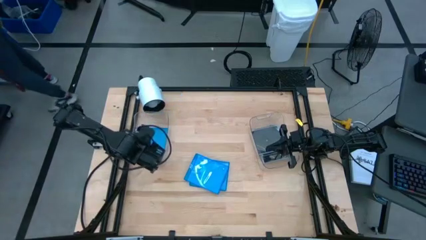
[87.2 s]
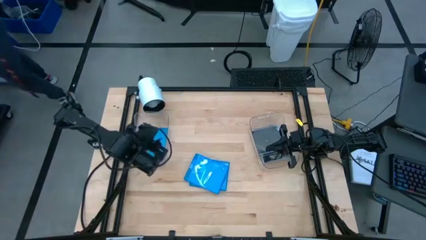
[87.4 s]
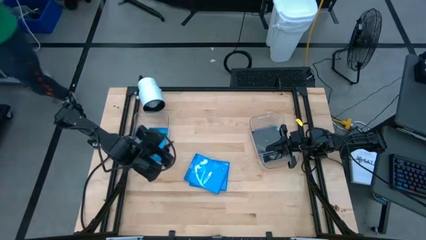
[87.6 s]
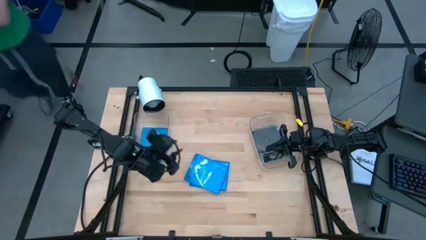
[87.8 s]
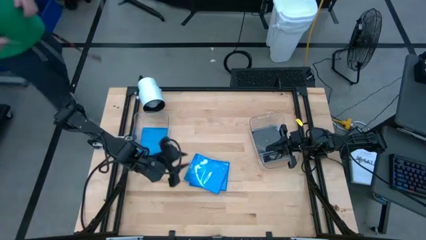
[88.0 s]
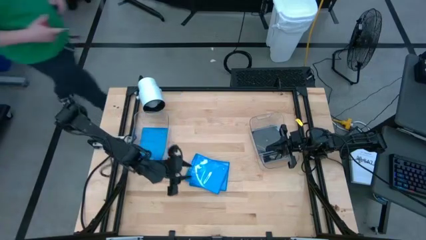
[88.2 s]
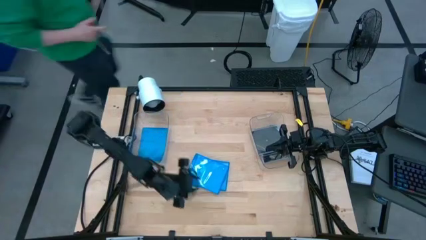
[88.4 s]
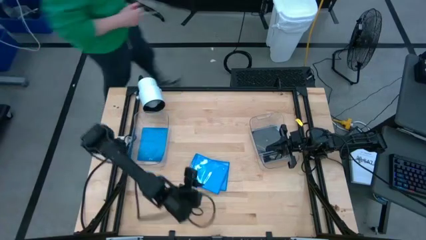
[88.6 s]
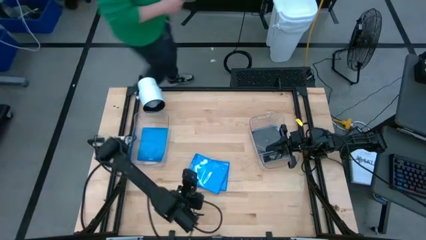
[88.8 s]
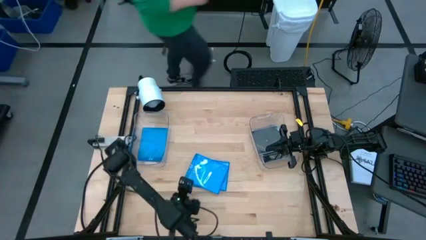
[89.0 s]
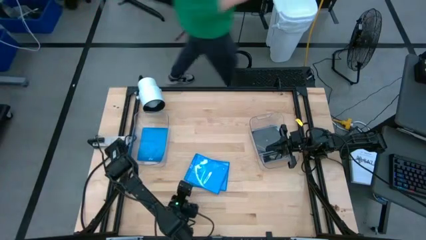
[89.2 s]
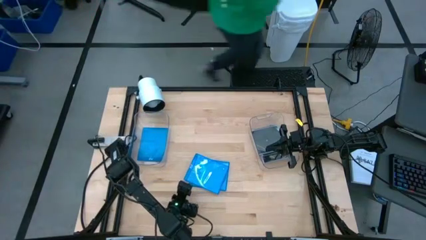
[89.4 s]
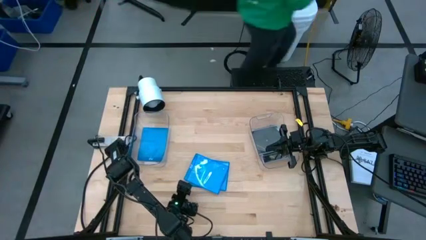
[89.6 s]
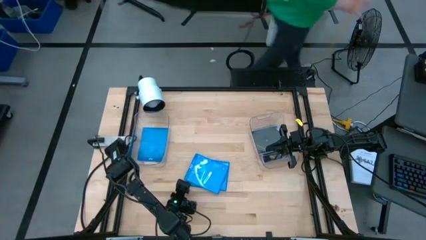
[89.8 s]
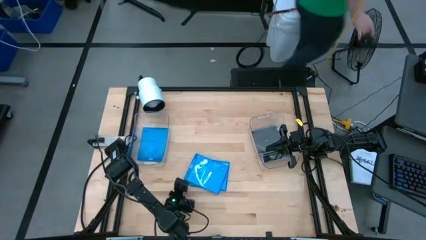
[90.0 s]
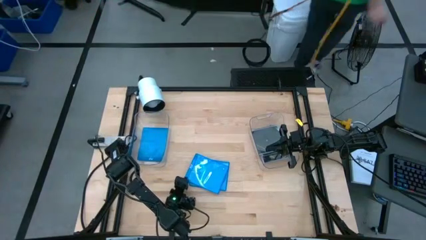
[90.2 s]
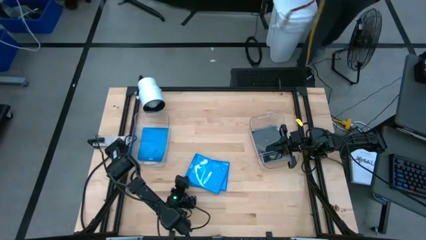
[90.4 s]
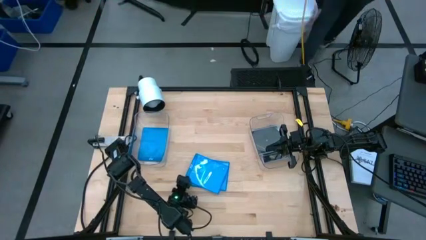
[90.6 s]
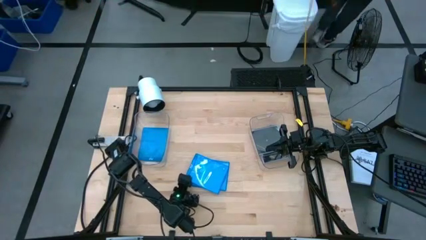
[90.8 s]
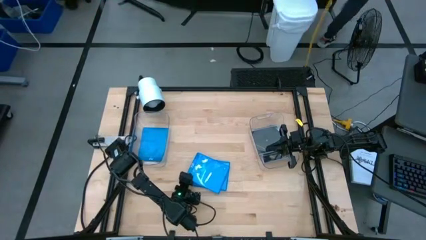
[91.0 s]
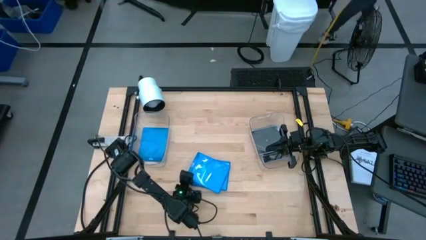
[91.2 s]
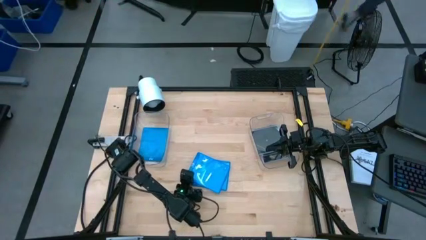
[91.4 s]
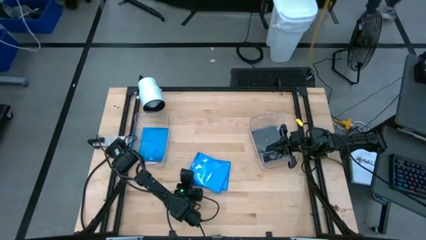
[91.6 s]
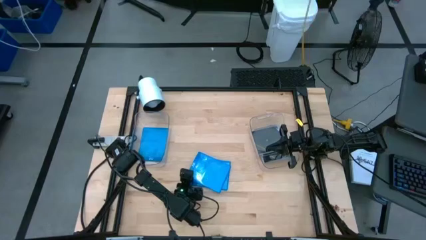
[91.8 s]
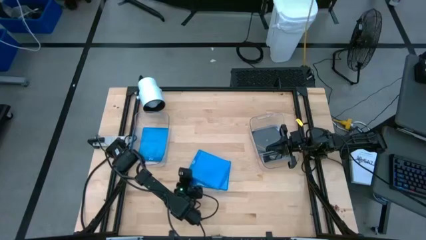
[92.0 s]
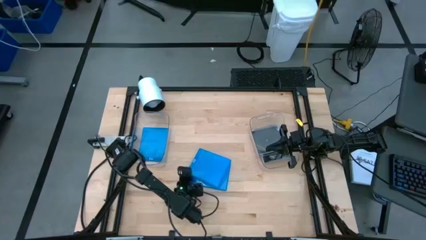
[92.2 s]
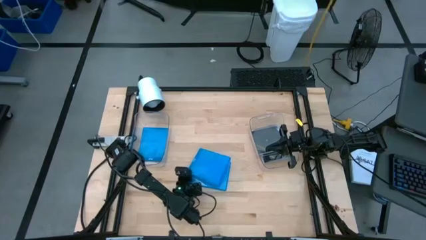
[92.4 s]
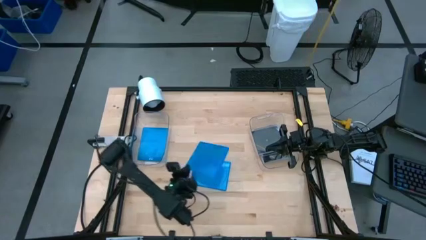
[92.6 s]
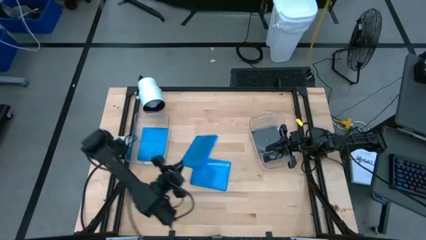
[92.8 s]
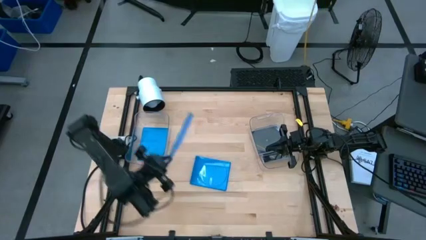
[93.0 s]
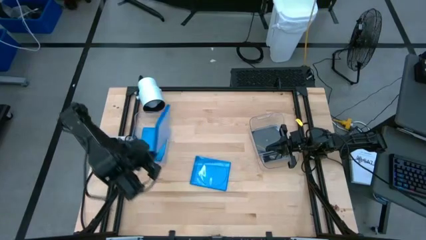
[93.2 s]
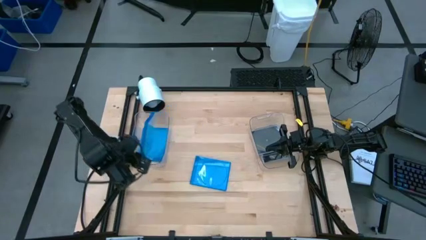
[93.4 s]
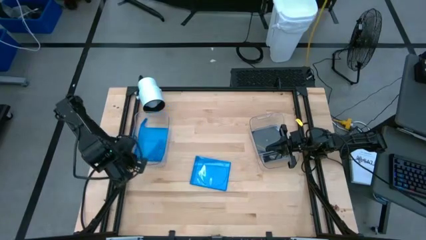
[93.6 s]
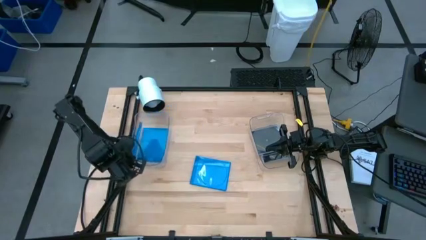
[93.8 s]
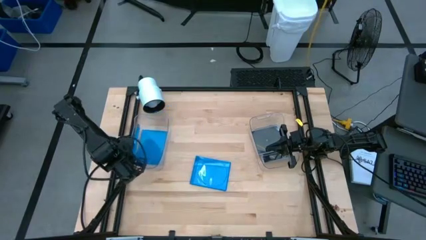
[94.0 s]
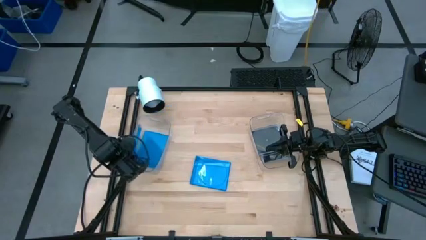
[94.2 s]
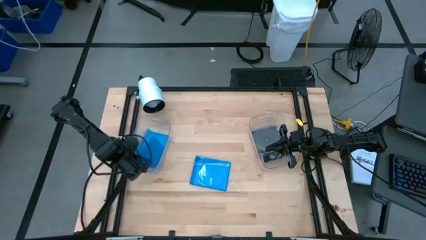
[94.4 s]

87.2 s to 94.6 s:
Task: Pick & place jewel cases by type
Put the blue CD case into the left transparent bin

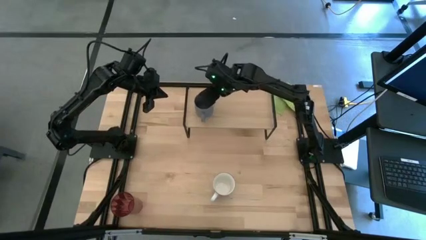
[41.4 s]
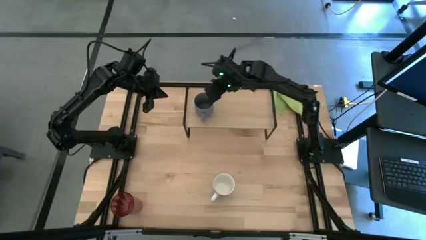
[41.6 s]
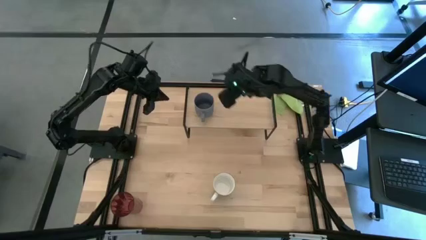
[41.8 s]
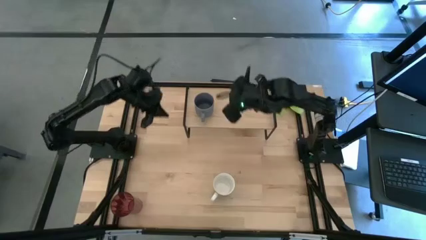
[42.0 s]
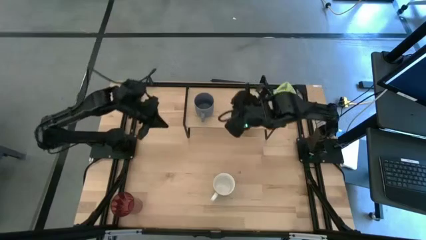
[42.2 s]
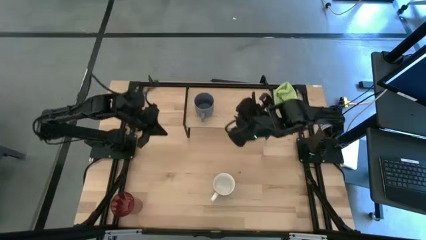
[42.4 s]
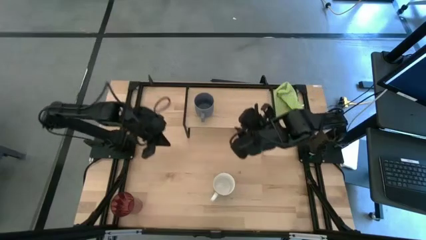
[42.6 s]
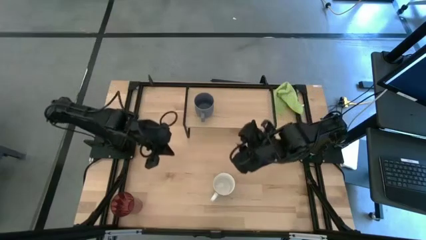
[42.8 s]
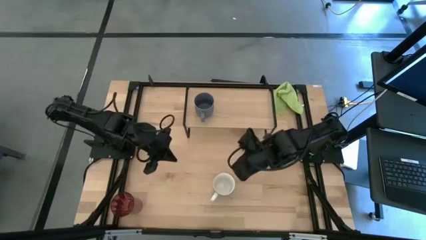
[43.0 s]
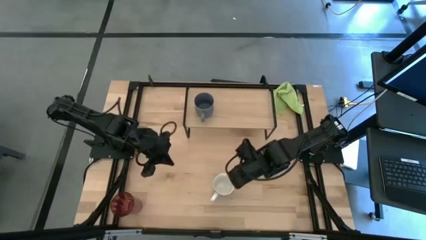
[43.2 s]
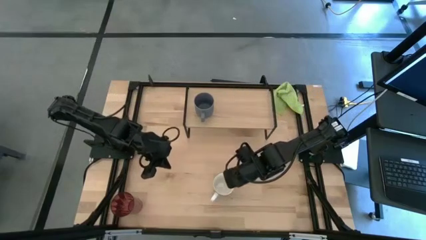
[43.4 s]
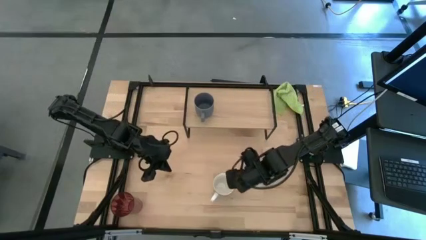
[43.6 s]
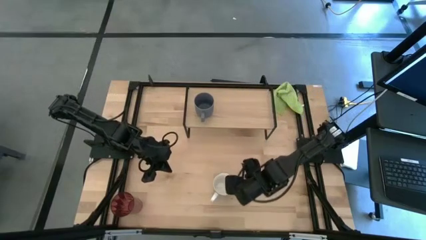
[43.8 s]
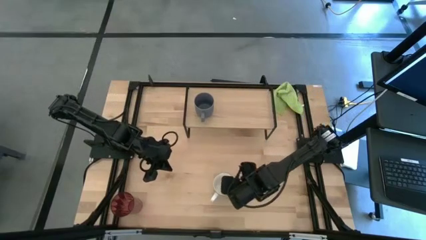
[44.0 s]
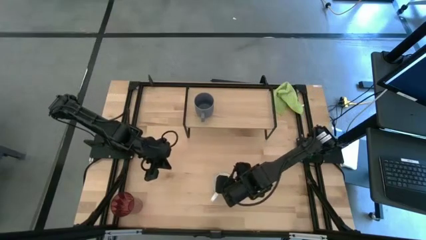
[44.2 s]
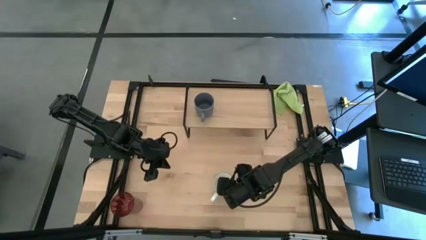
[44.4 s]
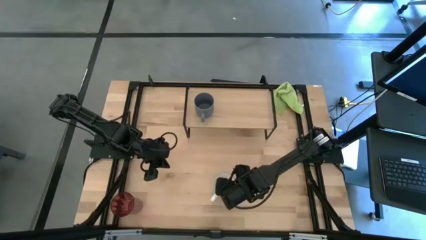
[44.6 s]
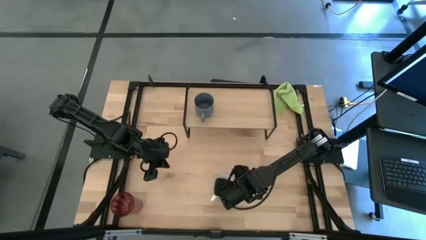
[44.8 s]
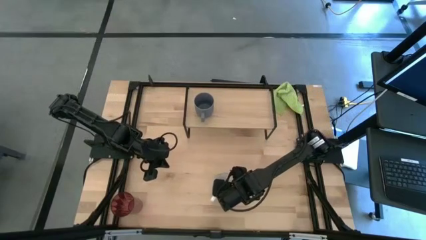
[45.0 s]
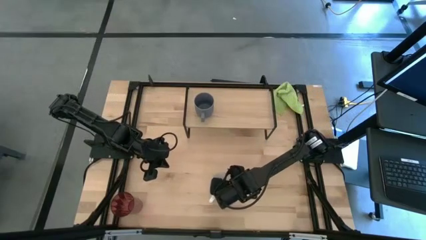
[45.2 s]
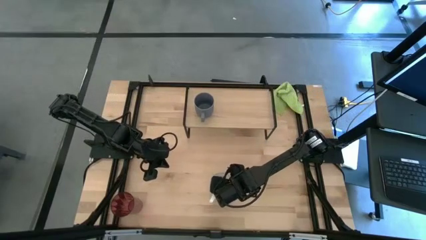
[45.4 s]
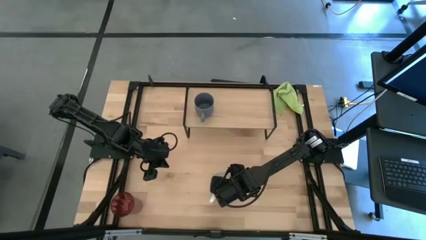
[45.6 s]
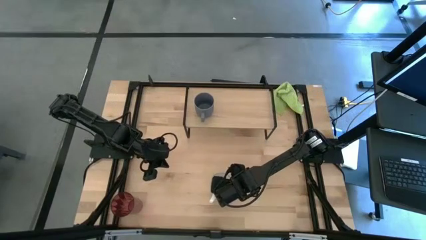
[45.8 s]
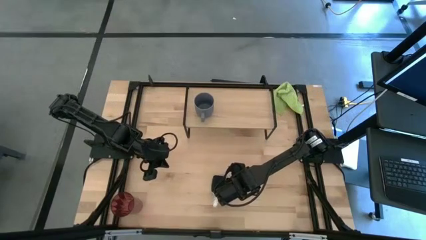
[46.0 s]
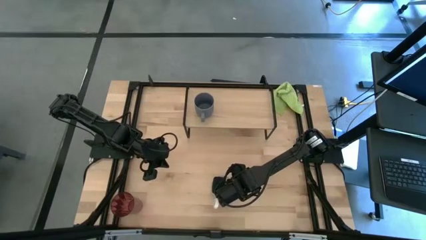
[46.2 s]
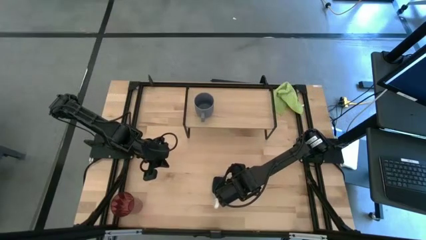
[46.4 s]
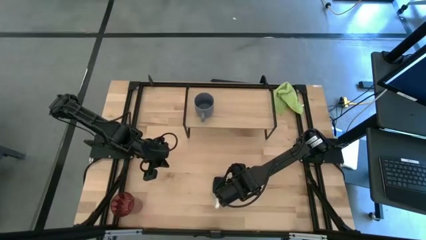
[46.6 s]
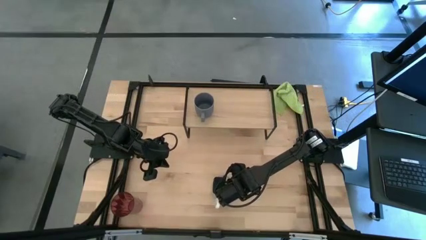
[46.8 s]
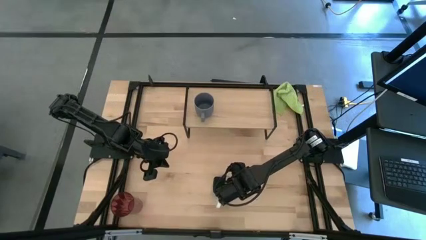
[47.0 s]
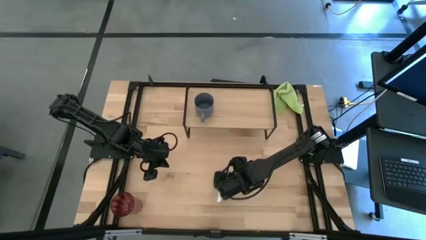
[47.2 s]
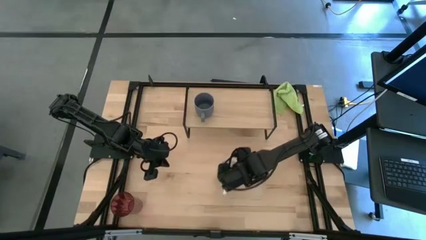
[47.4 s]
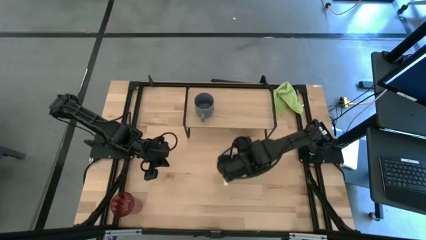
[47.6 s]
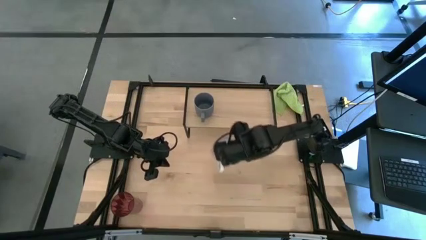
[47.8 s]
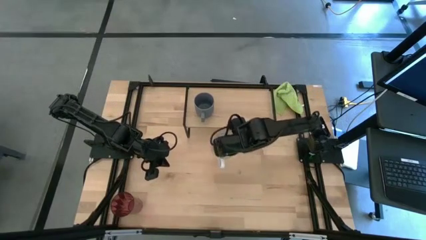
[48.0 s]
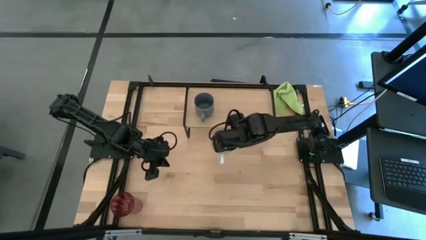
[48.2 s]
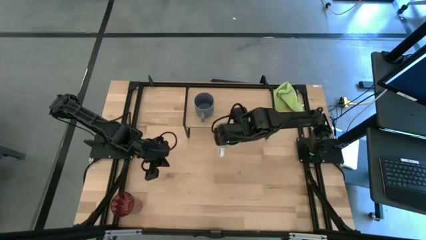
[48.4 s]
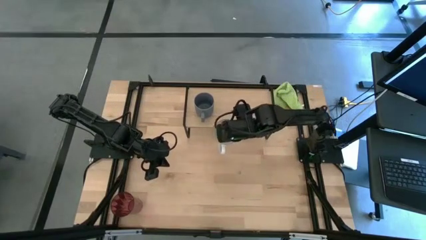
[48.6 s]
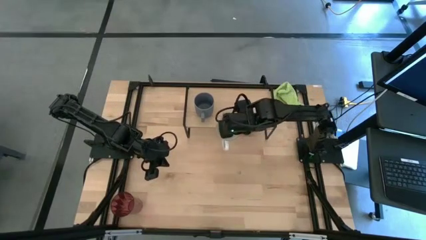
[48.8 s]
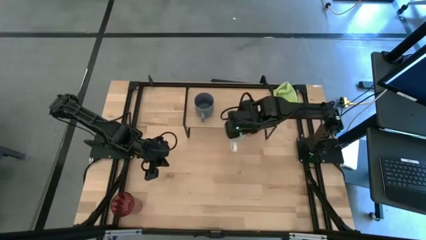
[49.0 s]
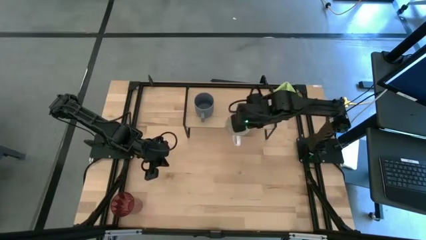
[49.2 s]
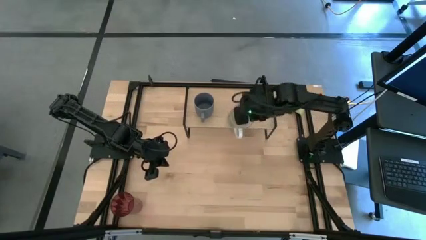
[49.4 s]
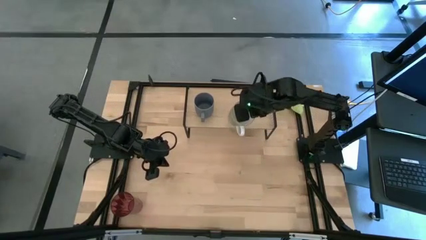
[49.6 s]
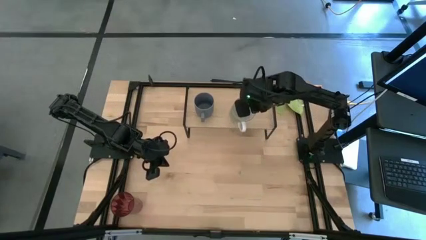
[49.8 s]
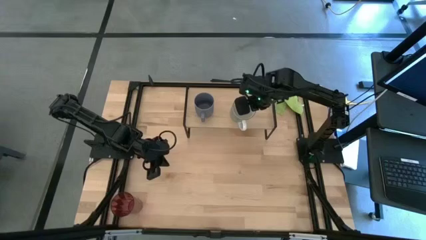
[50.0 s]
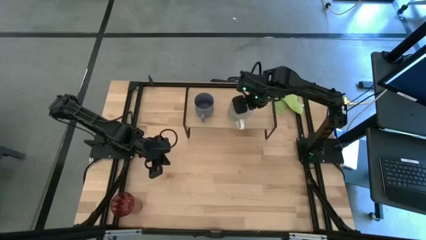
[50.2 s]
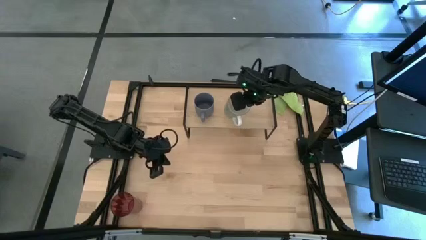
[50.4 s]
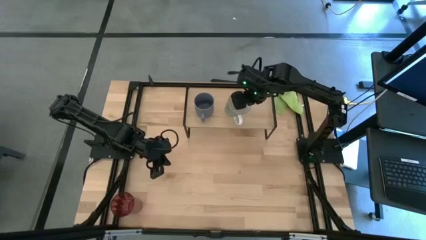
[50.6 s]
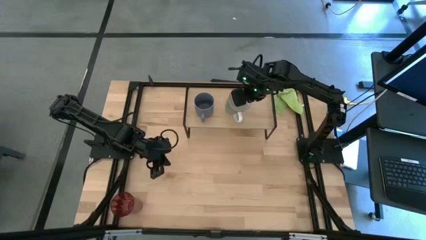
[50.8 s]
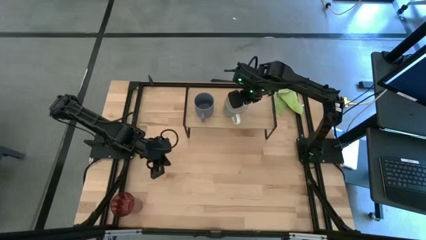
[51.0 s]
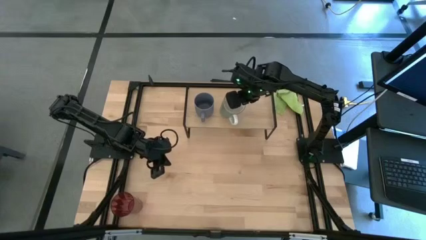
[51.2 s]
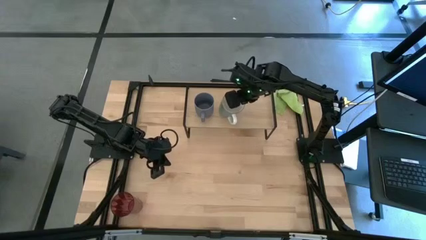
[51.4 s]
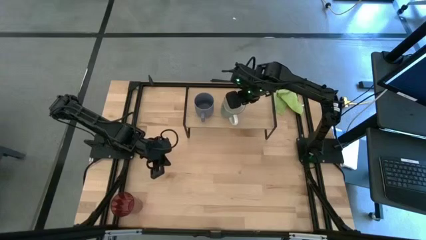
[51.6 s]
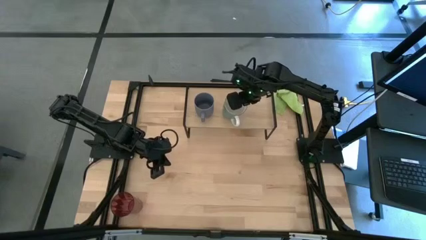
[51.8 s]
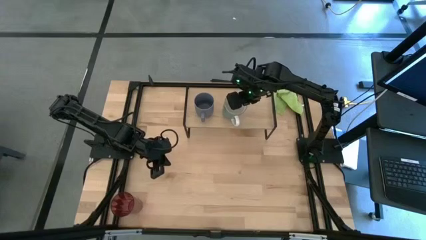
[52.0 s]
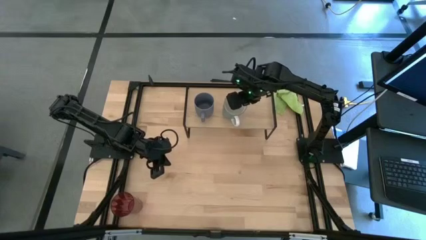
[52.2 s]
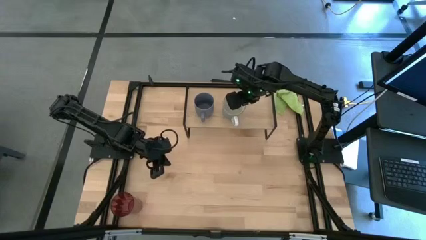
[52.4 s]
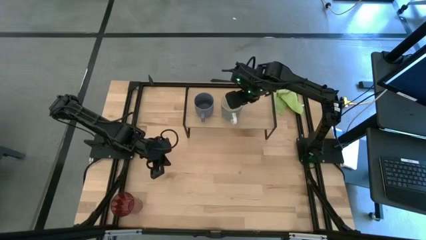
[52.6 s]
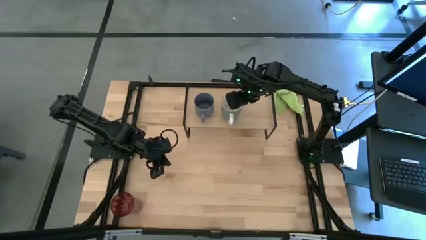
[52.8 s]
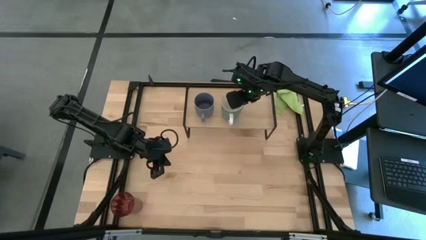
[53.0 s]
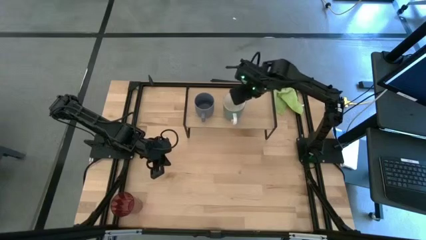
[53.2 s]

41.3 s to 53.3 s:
Task: Stack small to large cups/mugs on shelf
Put the green mug on the shelf
